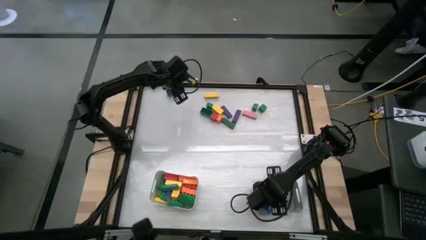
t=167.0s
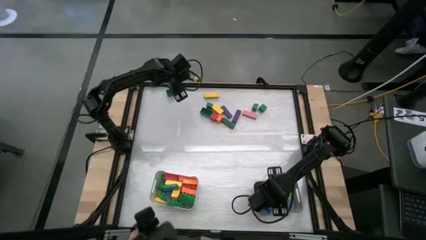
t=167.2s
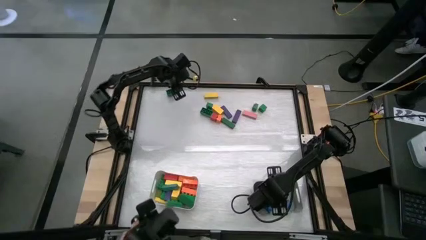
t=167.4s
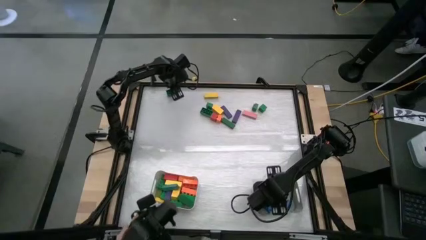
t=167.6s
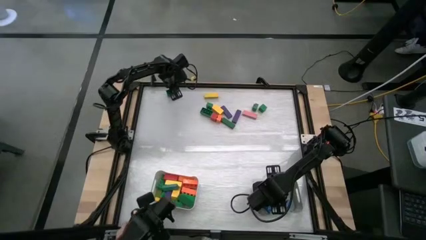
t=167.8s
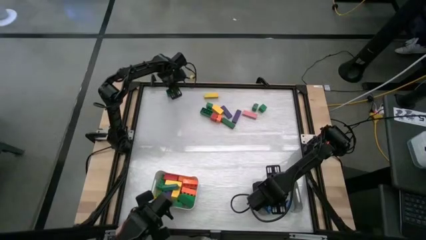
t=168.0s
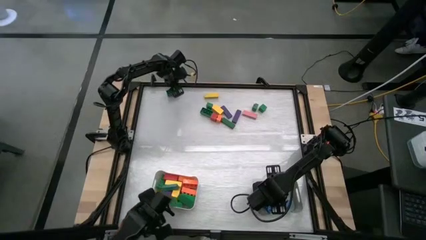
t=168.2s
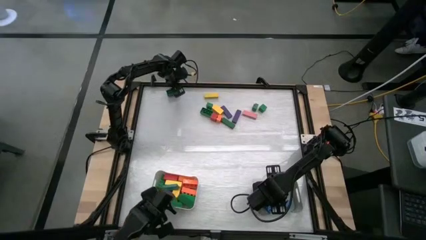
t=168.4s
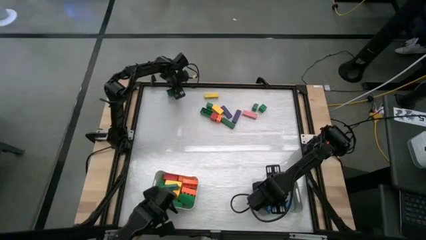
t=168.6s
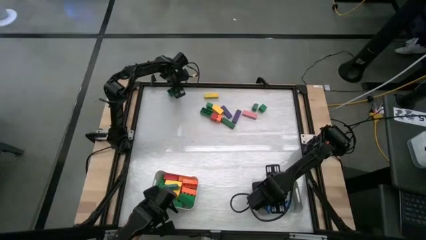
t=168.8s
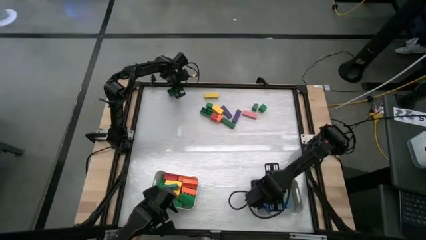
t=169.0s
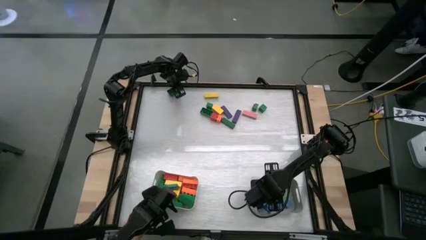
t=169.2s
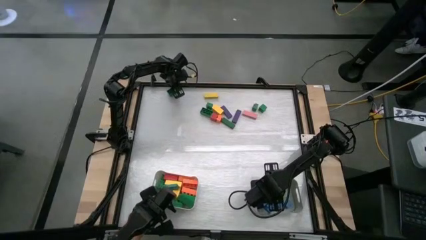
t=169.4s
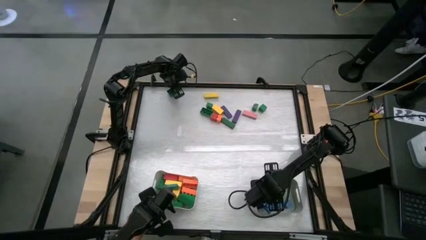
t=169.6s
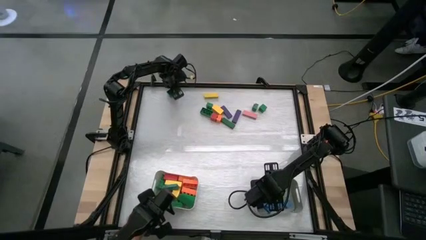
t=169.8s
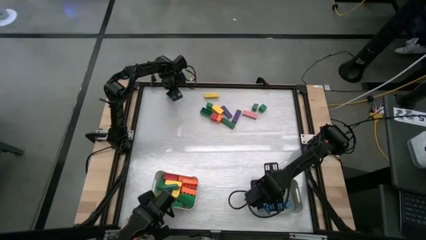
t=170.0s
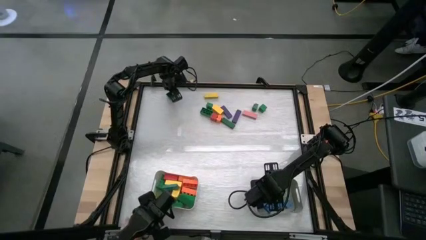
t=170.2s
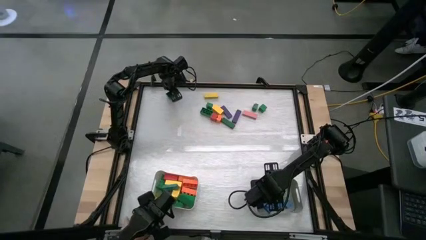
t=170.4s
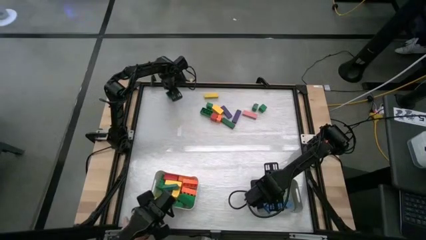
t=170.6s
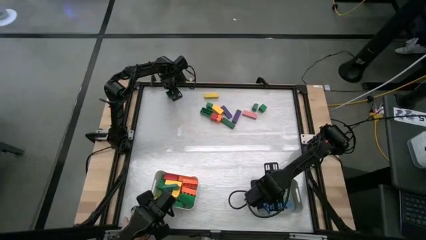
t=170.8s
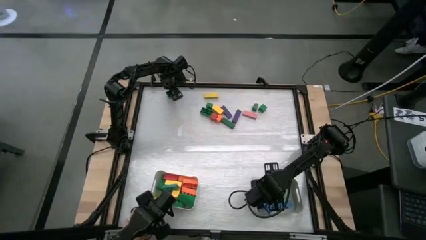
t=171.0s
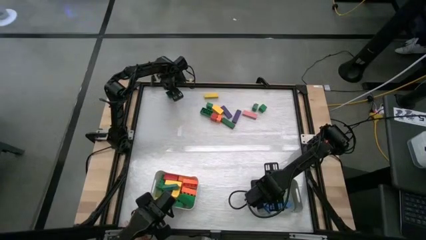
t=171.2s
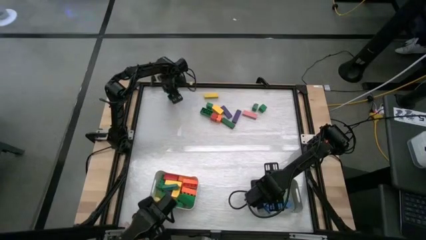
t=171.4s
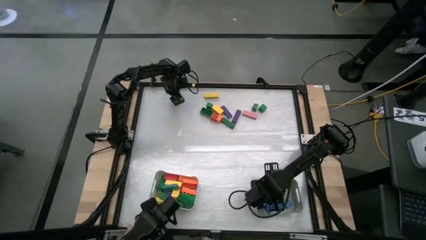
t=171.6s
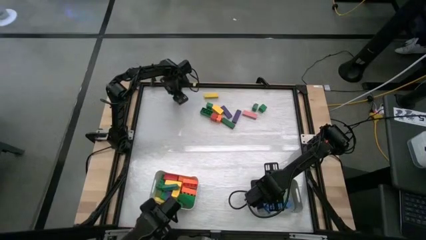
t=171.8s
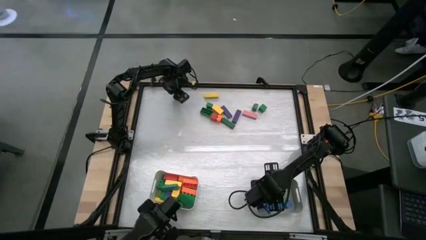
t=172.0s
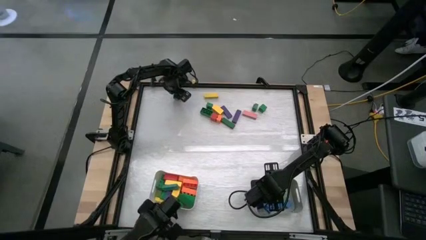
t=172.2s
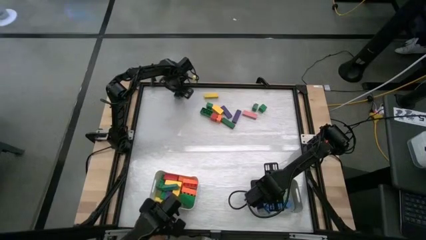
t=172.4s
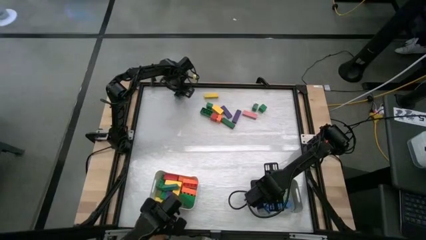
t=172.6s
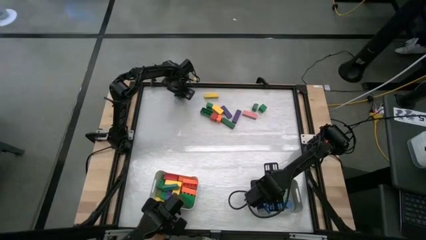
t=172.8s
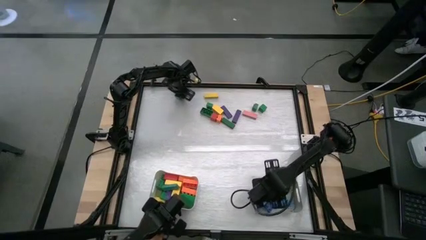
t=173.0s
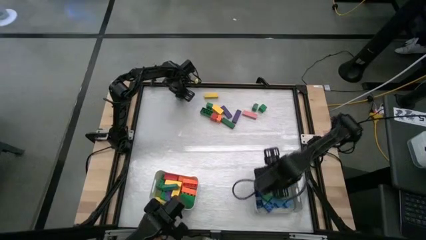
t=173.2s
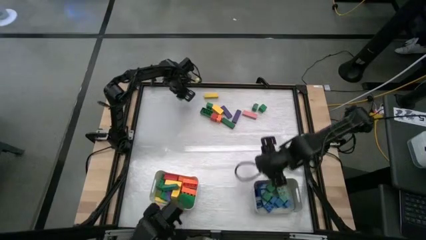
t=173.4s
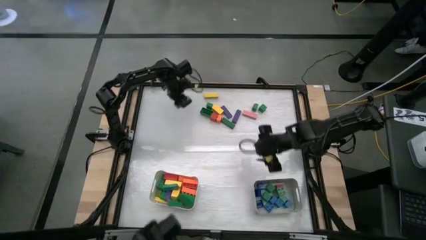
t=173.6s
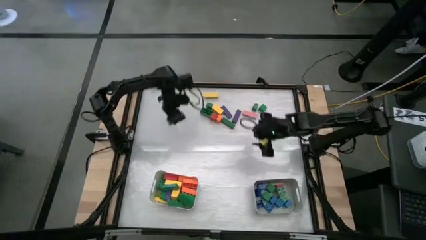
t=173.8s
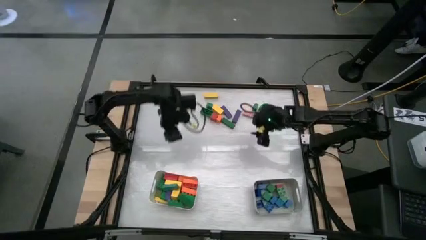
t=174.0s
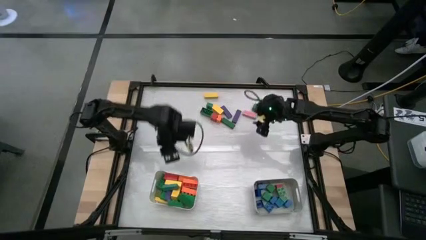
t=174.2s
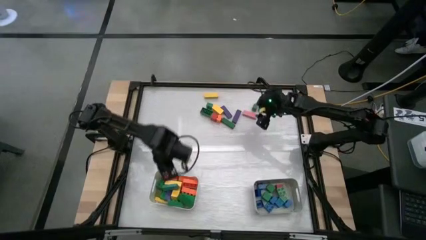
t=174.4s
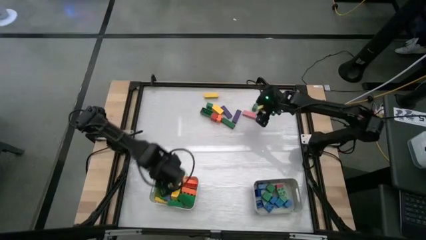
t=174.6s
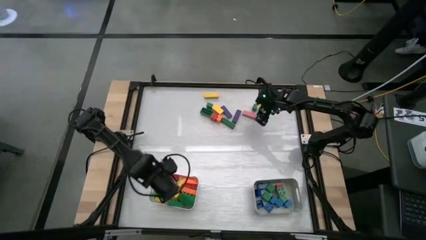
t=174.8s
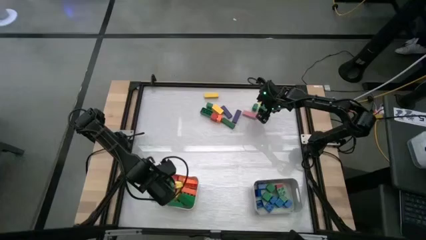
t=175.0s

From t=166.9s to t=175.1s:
Task: Sort blocks by size
Put the rectangular green game piece into the white bin

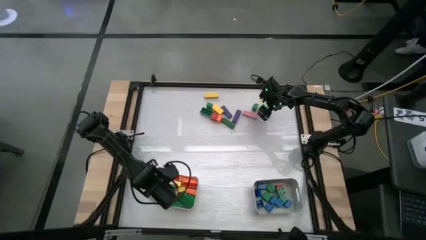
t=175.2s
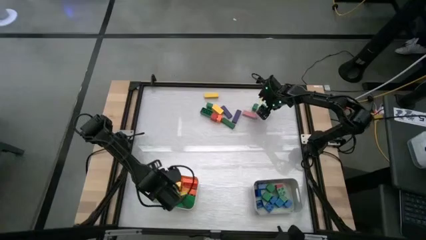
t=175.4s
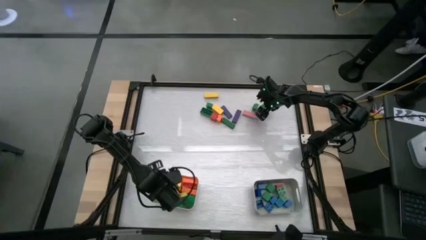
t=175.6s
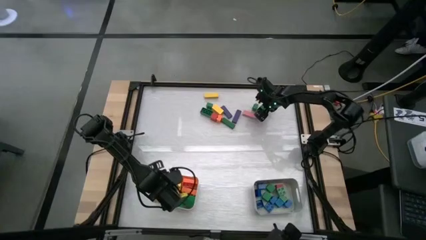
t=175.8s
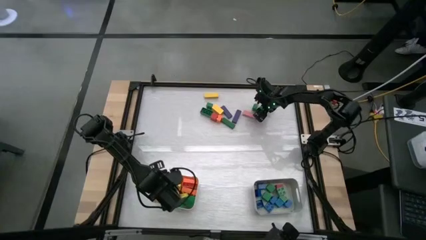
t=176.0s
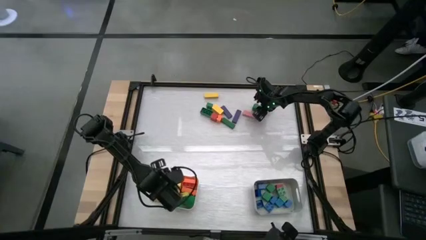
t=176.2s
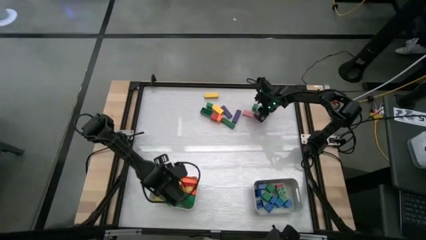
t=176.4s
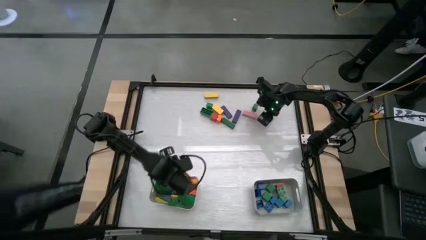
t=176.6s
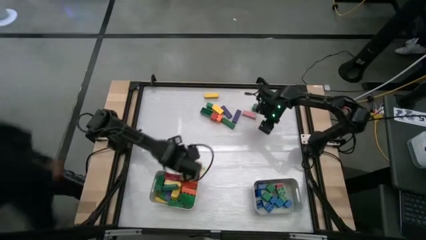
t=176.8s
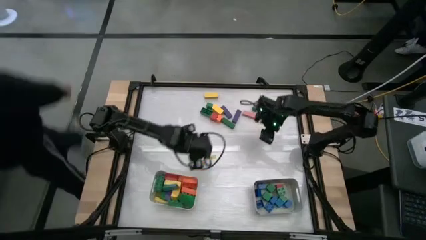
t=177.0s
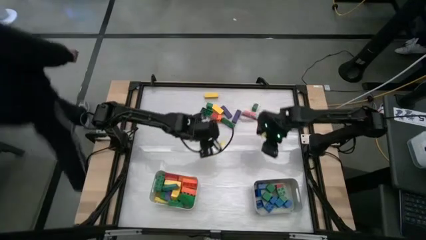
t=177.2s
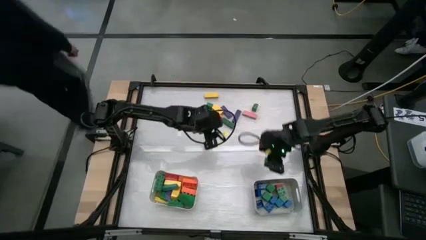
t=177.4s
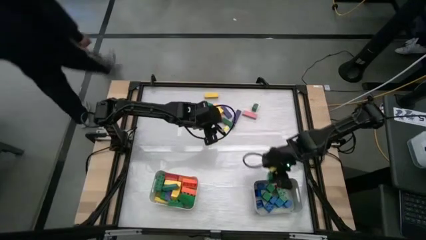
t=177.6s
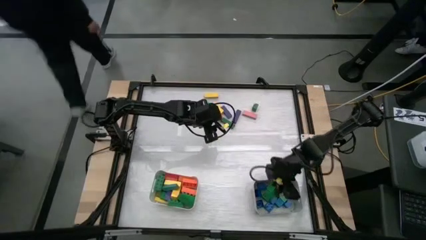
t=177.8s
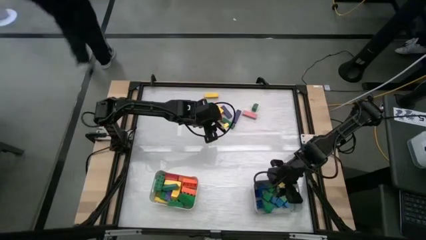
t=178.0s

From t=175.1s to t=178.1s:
Put the square green block into the gray bin

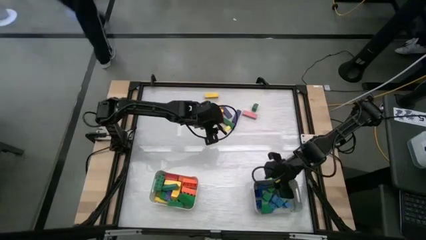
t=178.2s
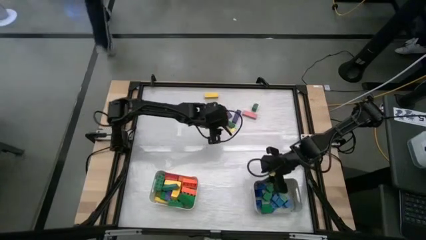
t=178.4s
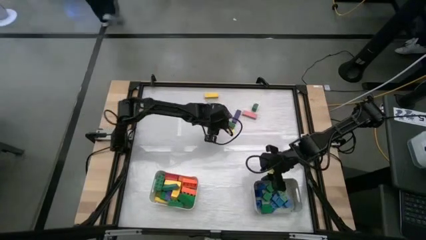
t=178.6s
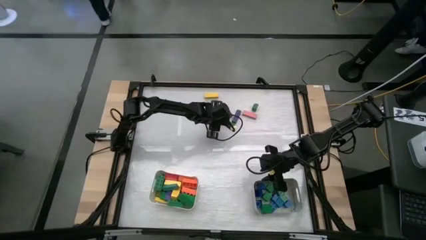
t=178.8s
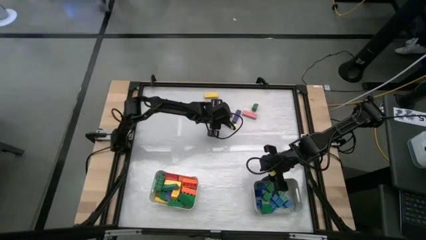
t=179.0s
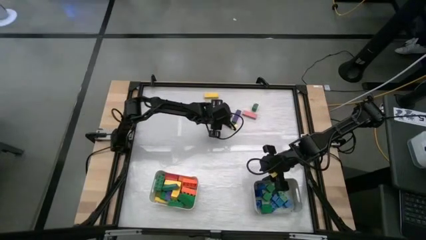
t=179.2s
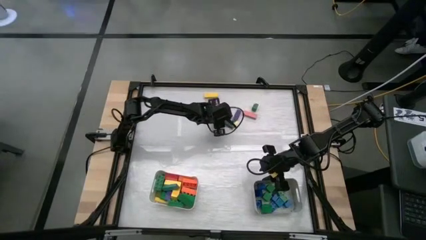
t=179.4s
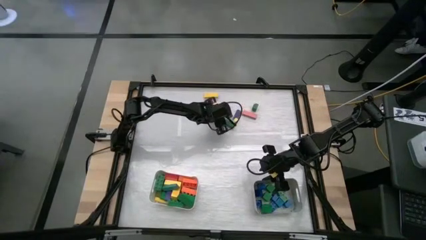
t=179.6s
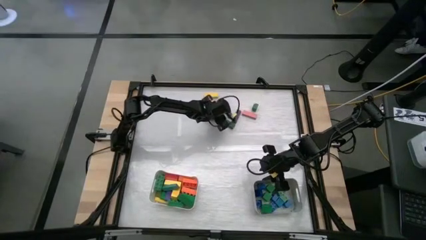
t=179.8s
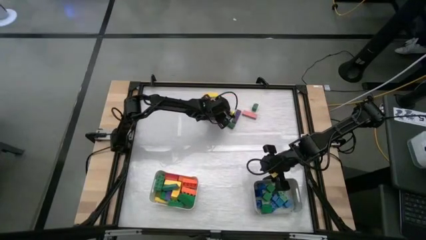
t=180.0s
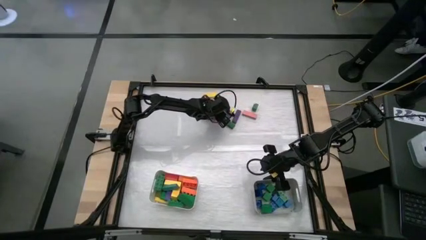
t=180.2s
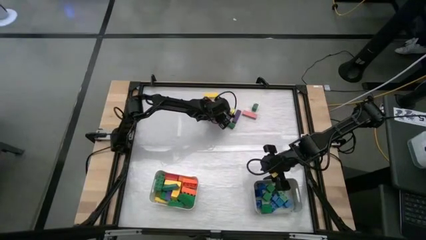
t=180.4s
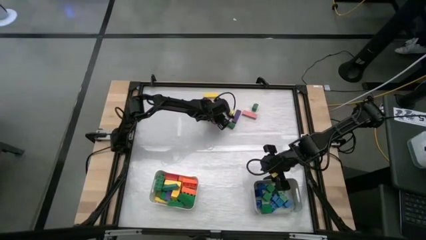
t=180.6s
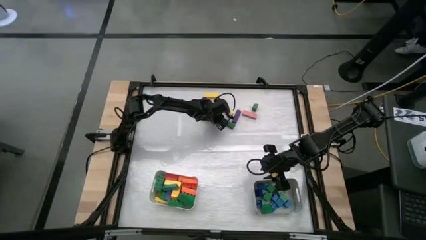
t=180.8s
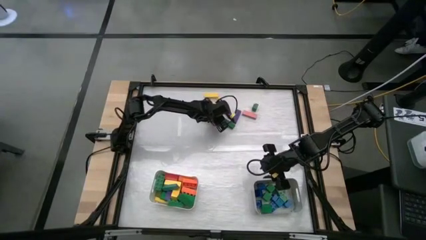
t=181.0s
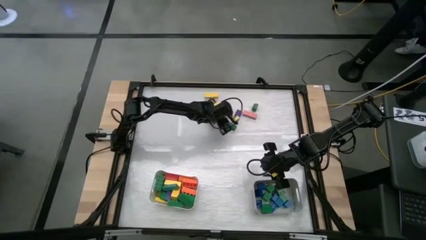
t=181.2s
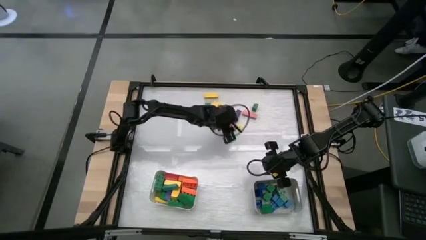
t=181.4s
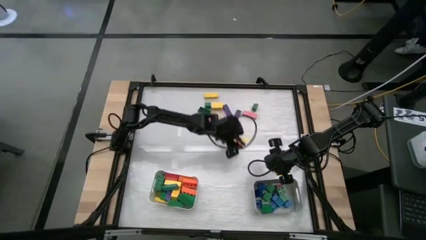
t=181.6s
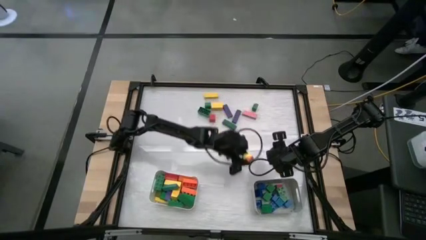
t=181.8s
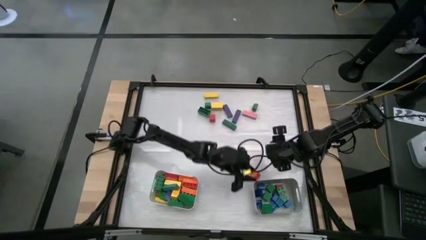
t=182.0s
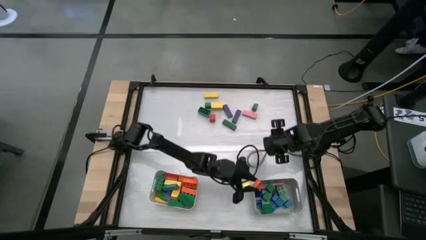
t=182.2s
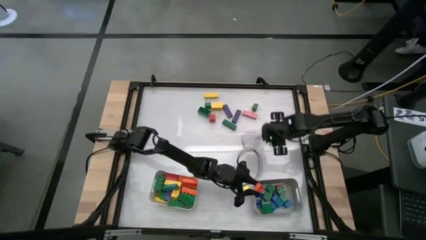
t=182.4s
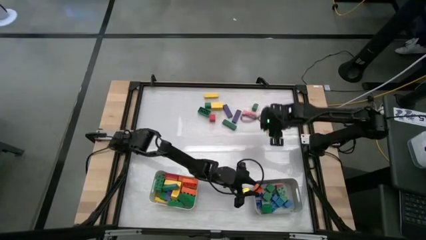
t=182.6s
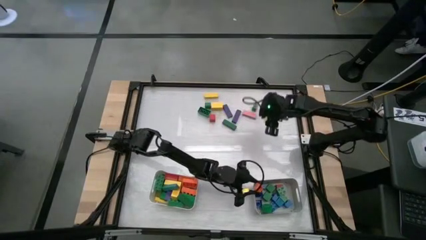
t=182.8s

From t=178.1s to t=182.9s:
Put the square orange game piece into the gray bin
